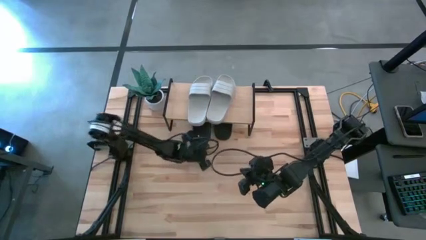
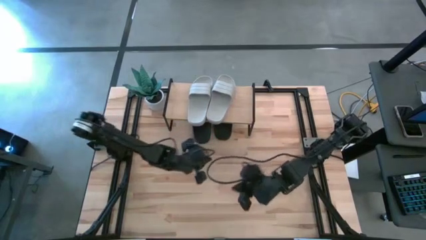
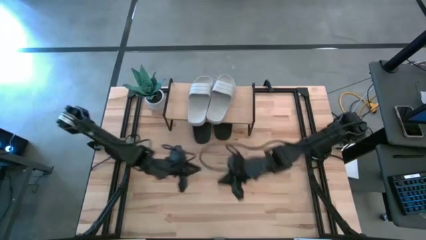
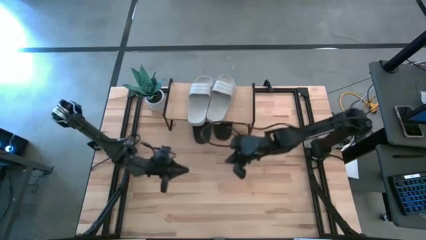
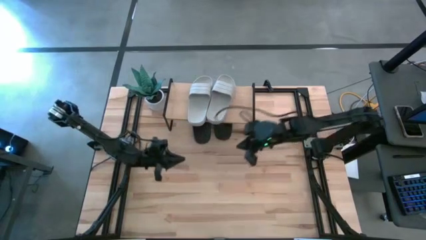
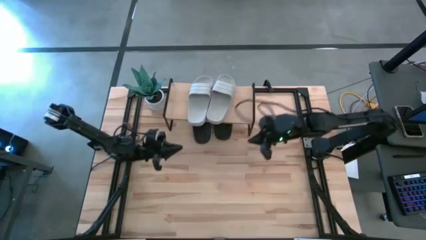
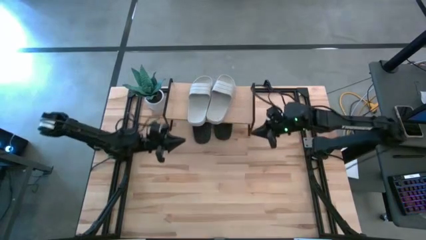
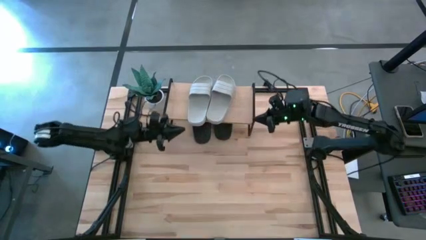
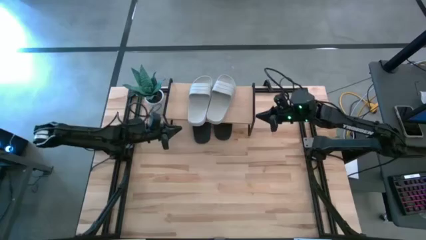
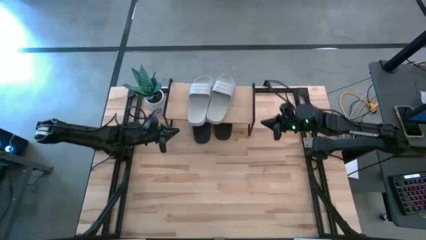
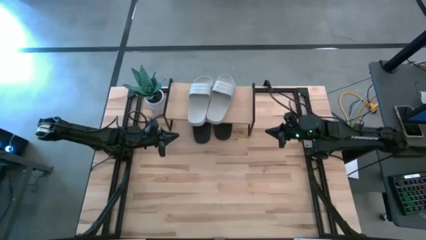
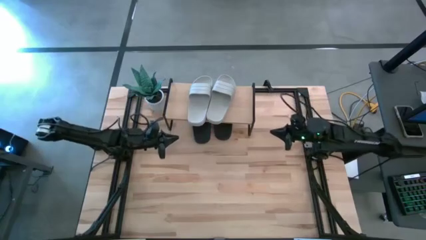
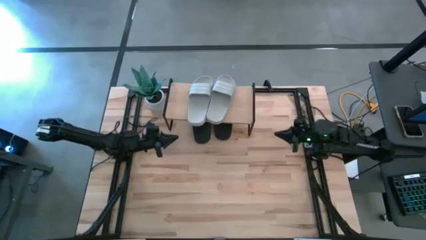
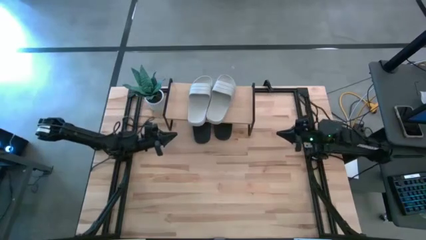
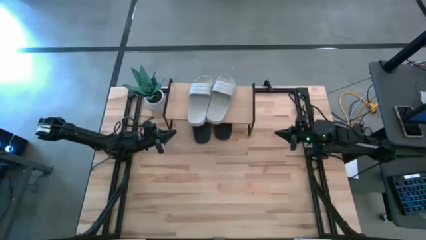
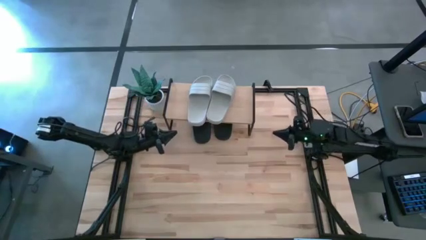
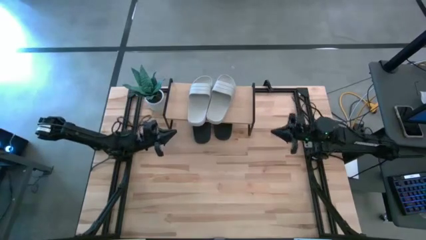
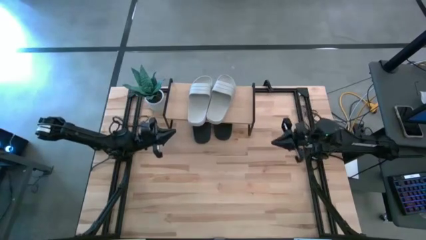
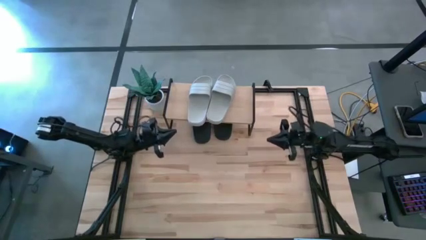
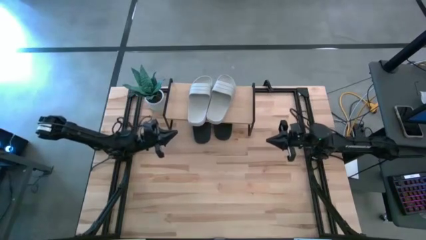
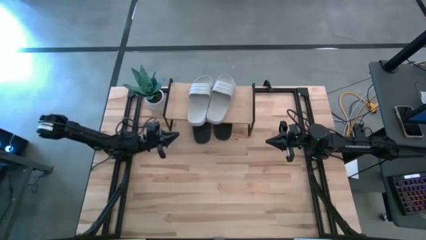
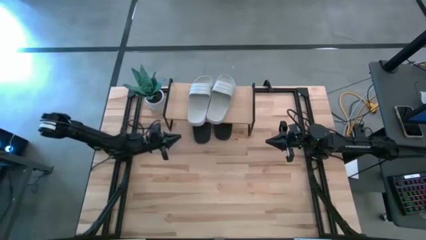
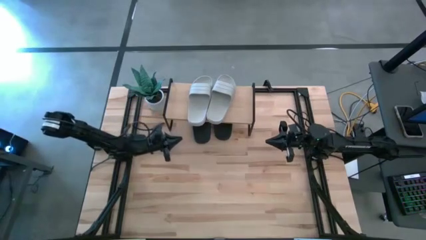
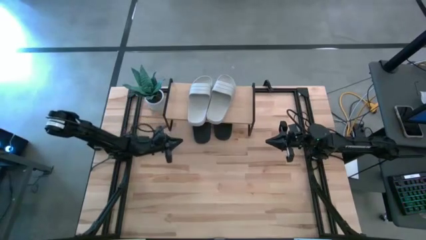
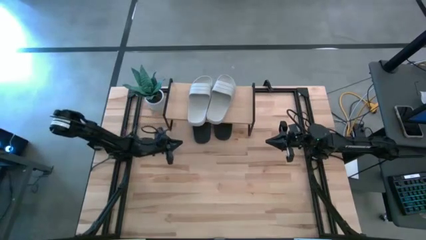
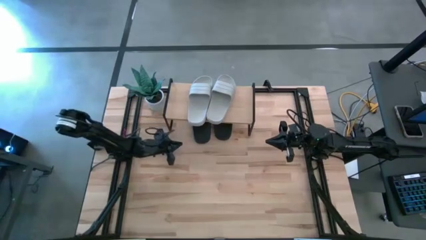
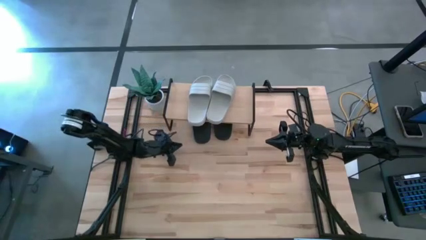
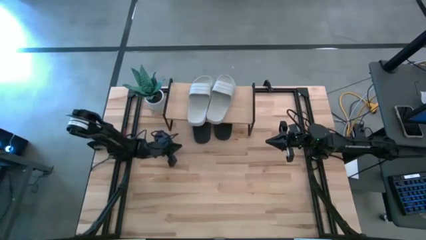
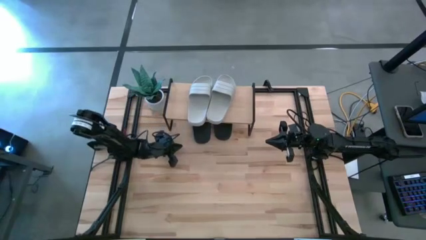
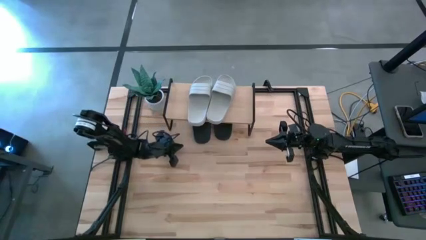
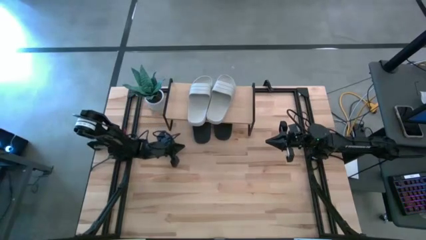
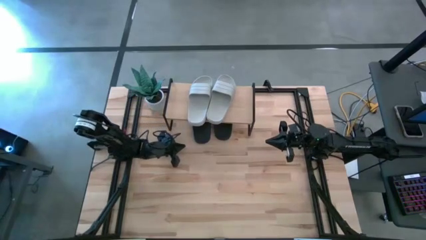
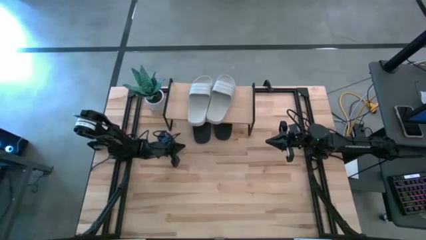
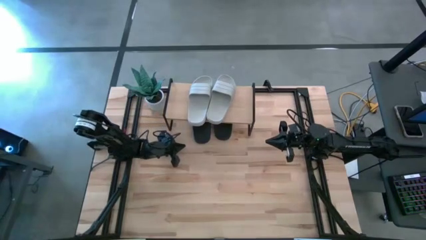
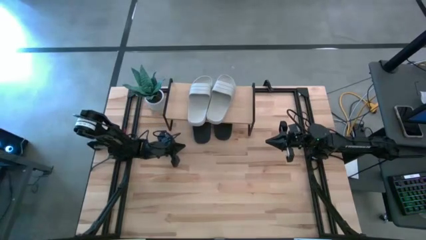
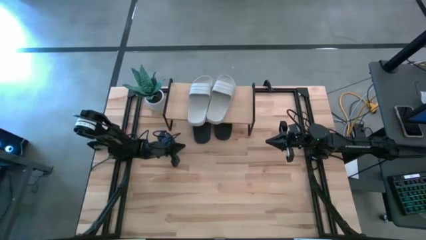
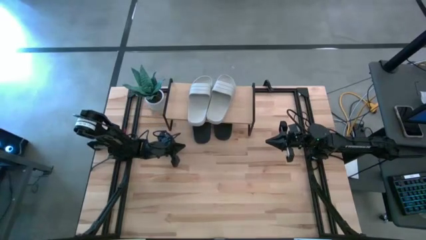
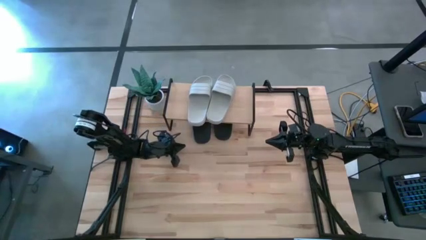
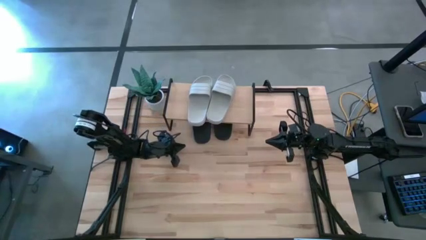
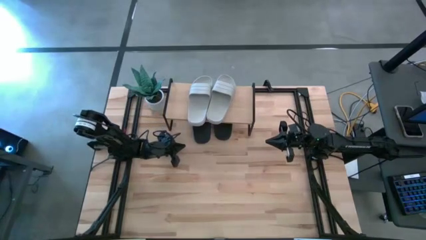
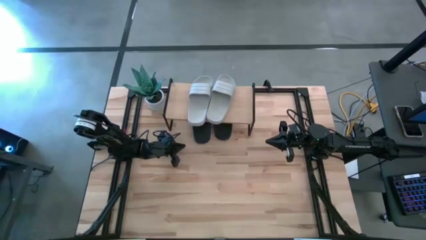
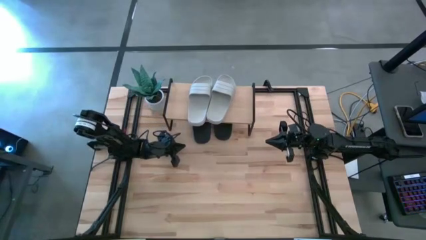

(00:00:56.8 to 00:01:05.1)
Task: Pick and place slides into the shelf
Return to Home Position

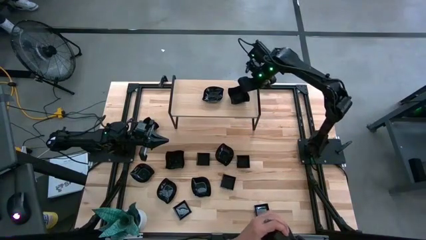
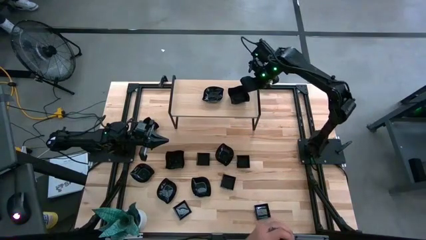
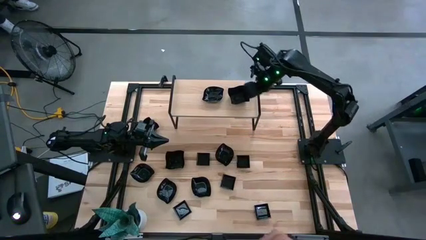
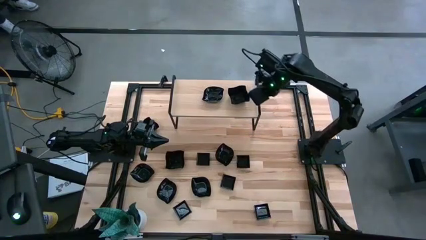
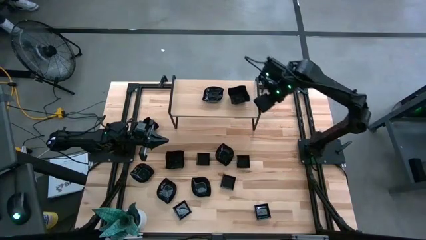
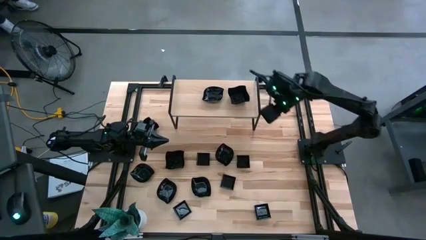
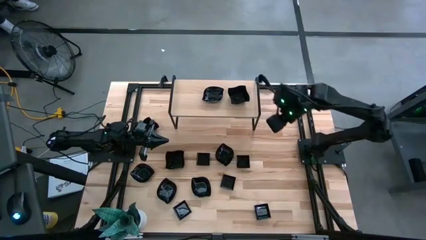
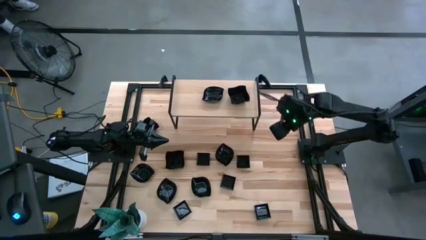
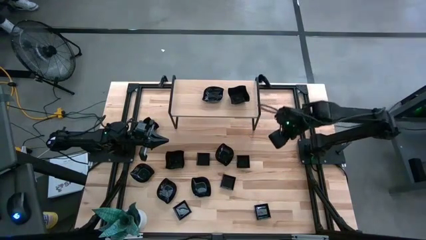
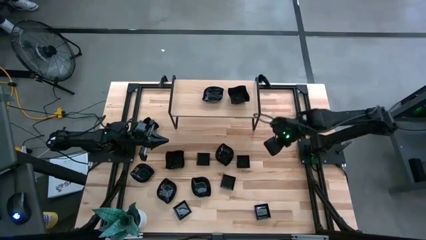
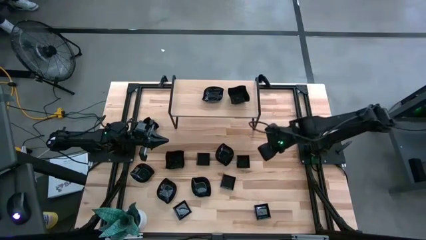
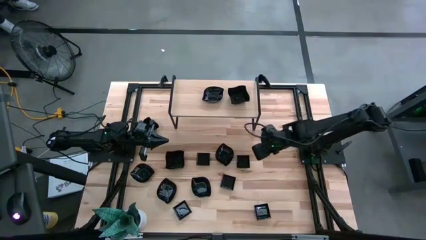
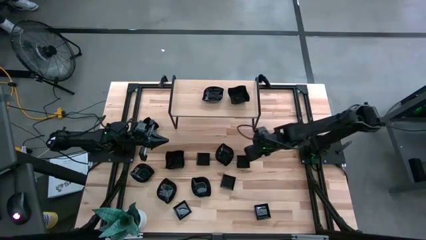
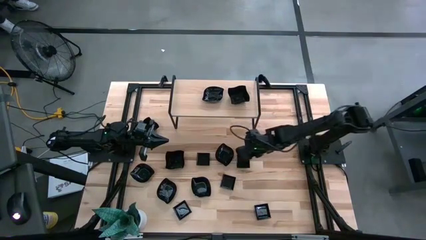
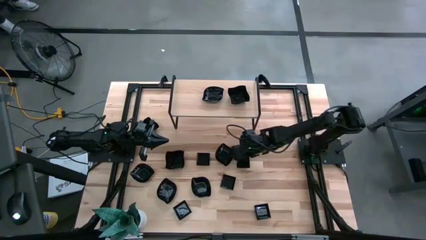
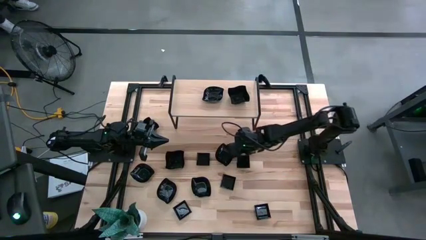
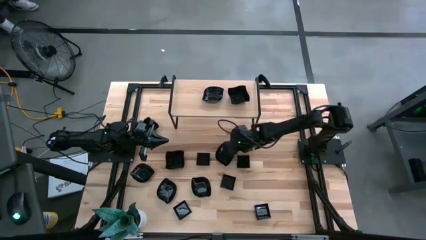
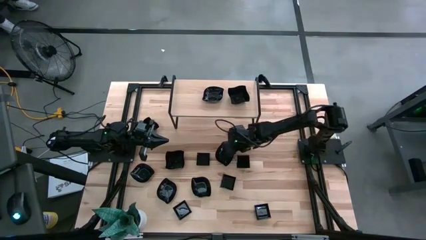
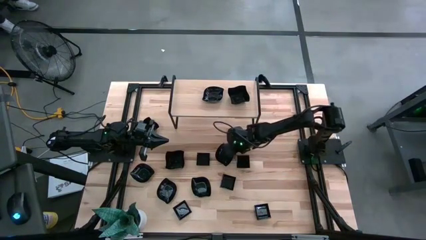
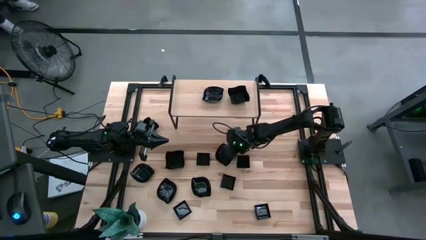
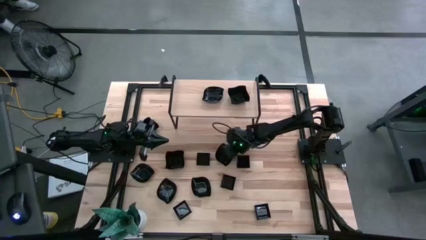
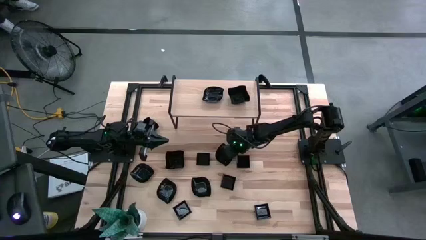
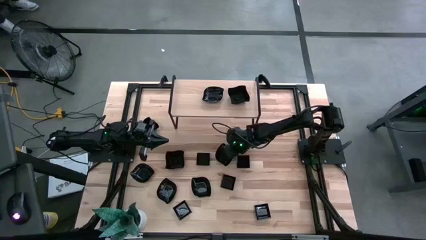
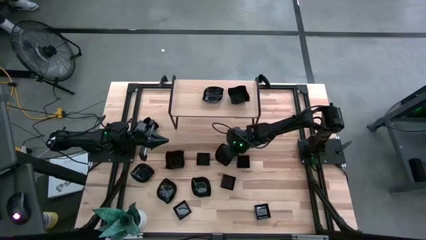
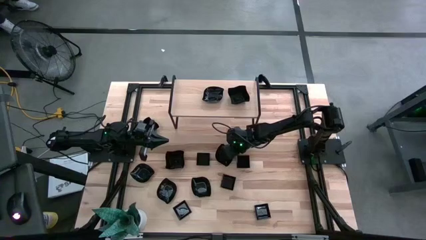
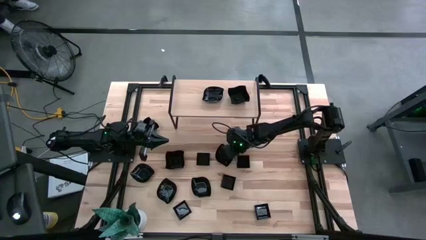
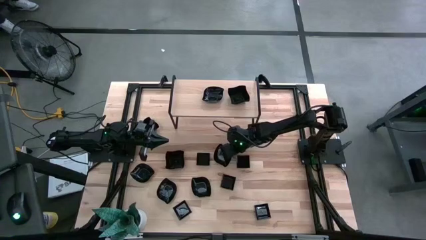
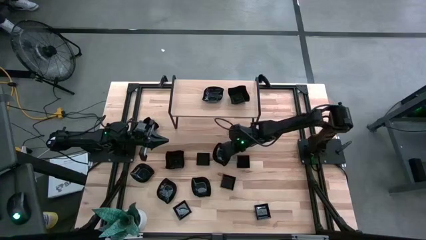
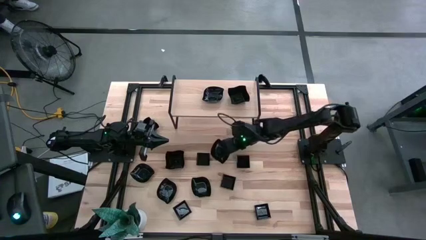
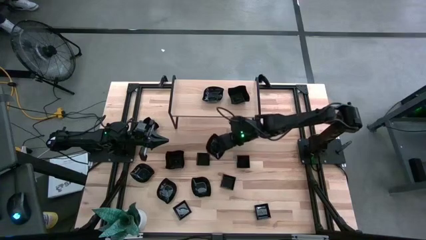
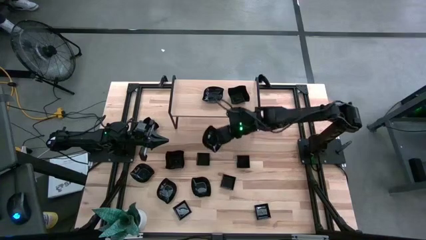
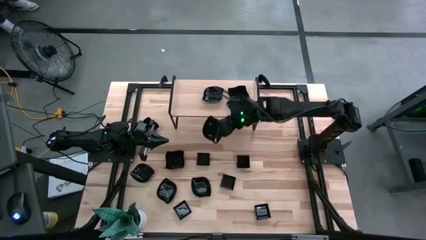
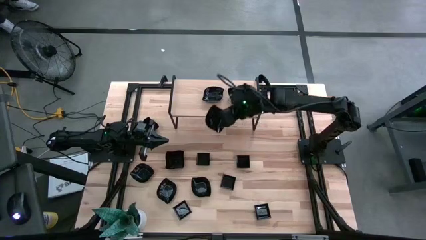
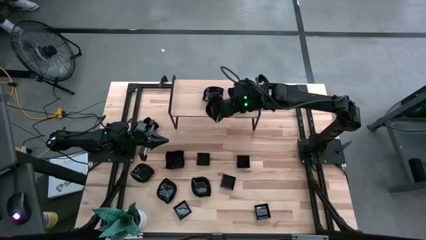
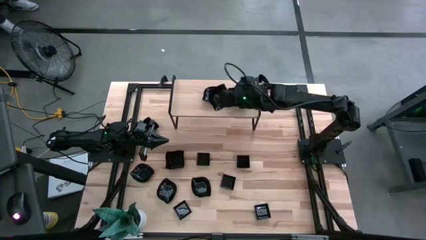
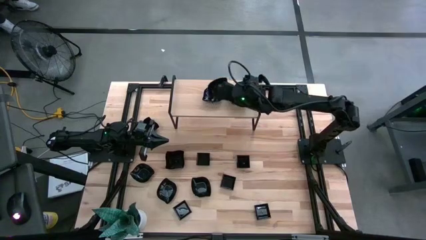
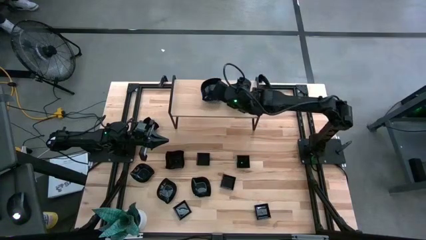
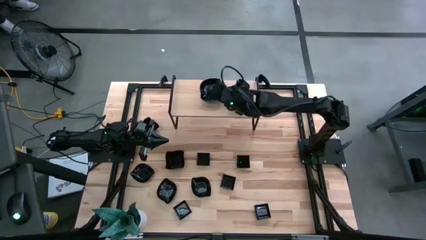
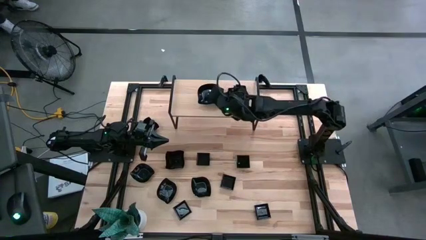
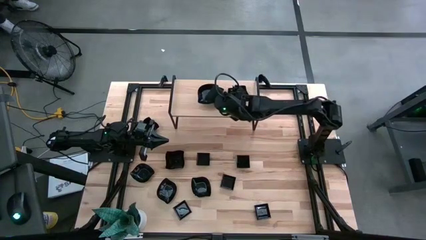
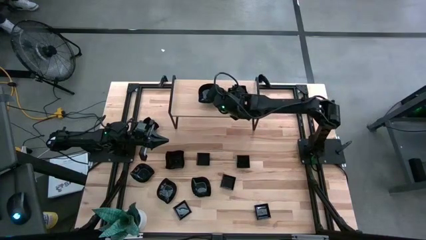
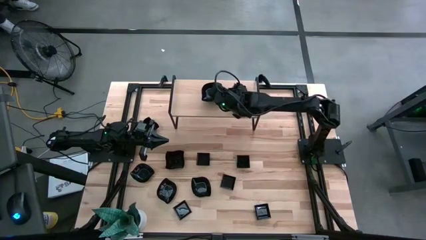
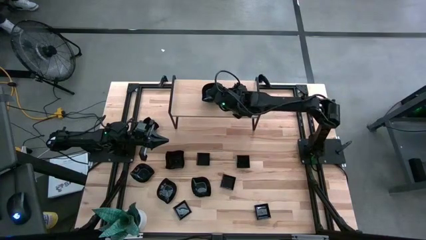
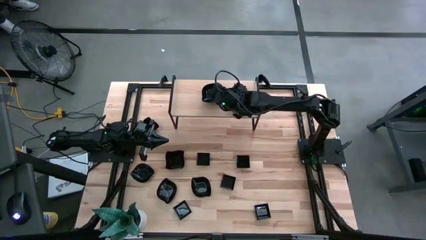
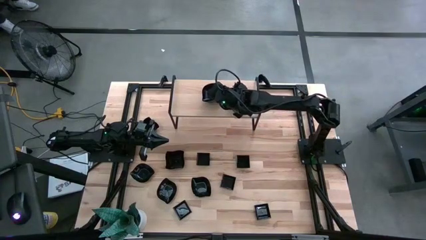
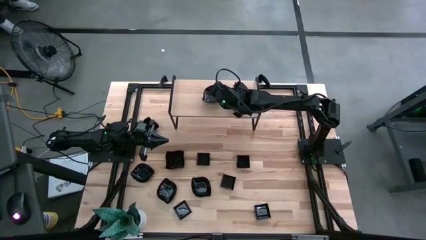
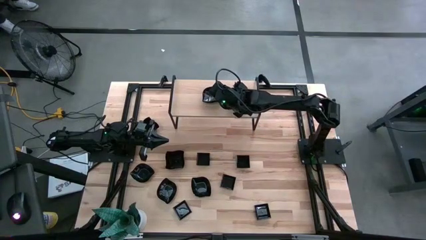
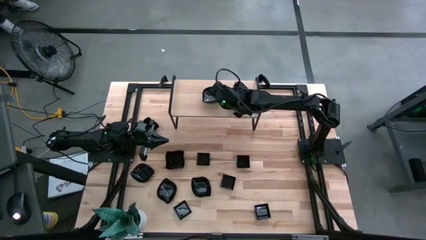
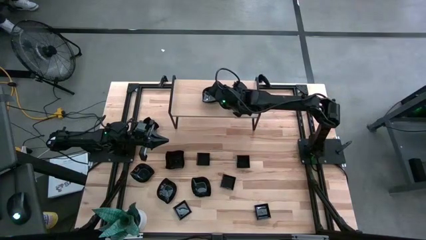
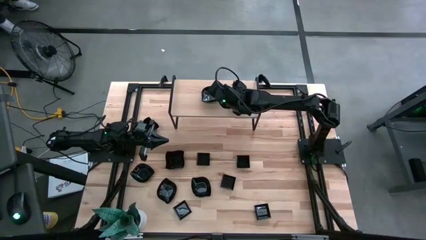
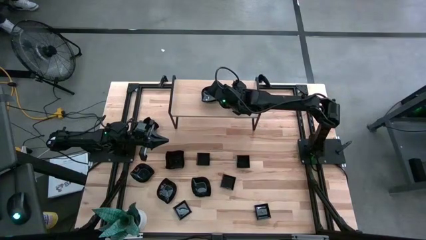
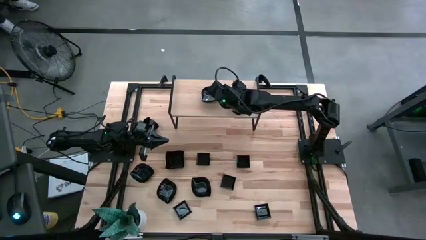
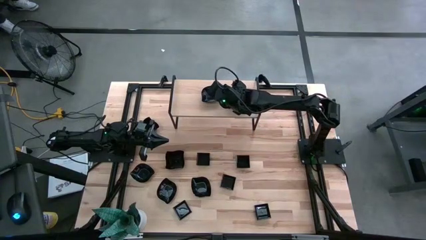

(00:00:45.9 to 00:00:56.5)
Task: Pick & Place Mini shaped plates
Stack the leaf-shaped plate on the leaf-shaped plate
